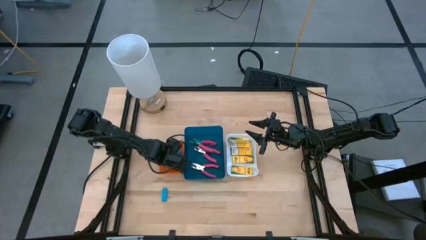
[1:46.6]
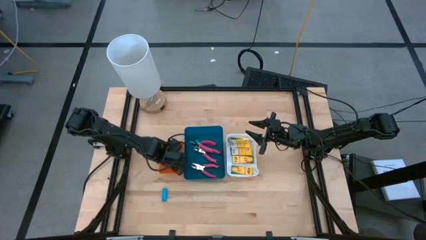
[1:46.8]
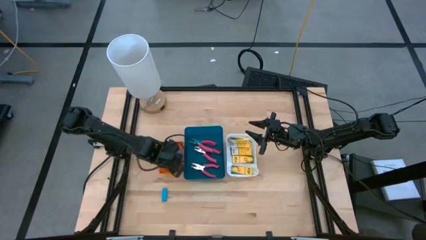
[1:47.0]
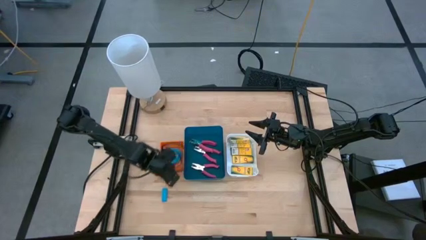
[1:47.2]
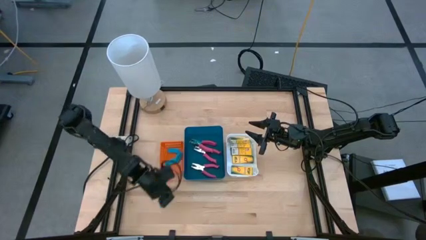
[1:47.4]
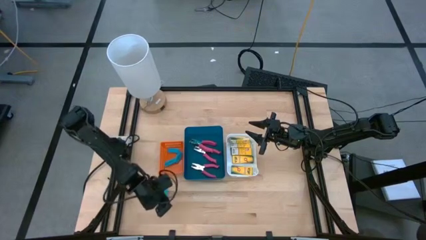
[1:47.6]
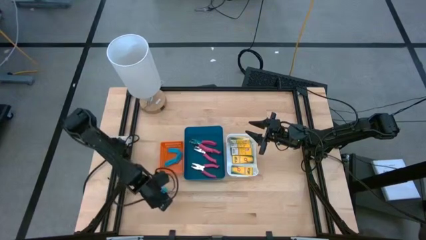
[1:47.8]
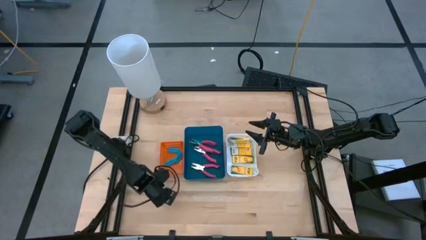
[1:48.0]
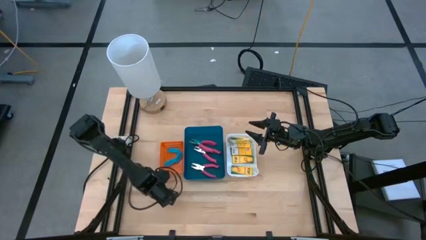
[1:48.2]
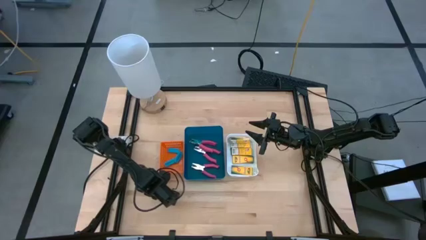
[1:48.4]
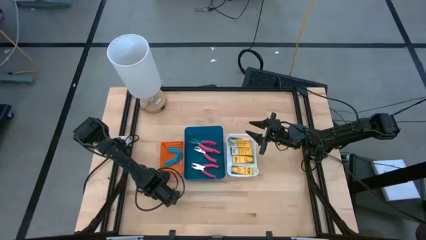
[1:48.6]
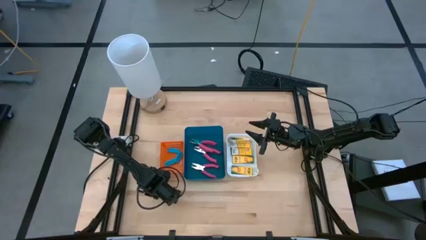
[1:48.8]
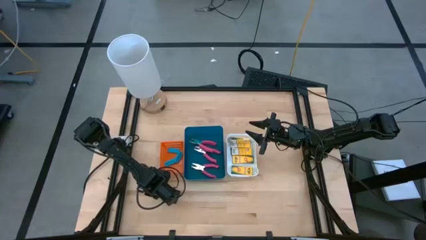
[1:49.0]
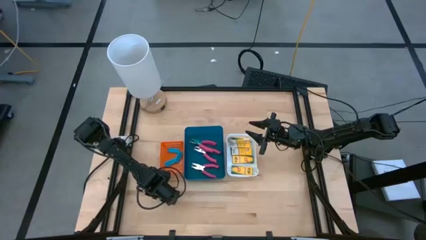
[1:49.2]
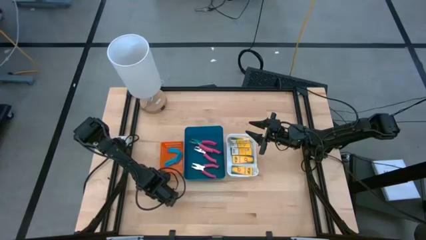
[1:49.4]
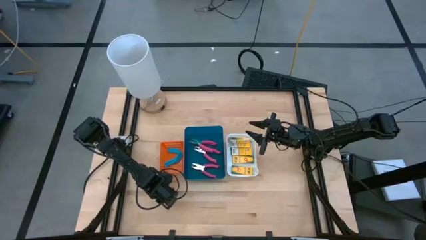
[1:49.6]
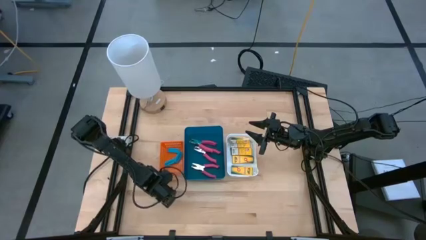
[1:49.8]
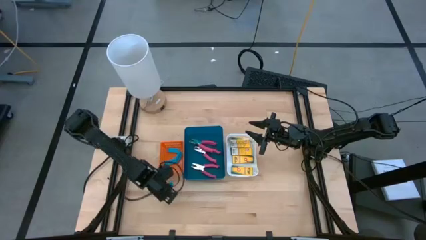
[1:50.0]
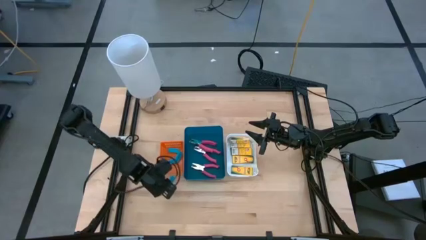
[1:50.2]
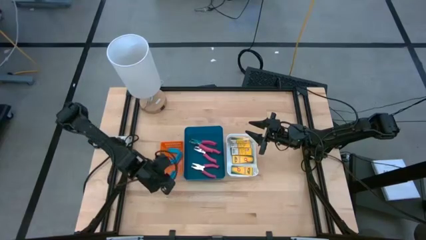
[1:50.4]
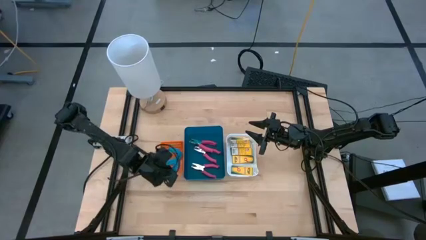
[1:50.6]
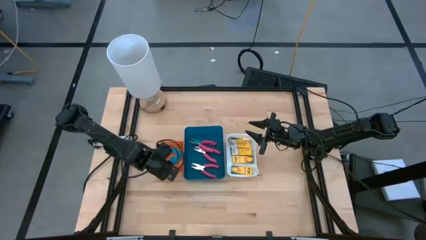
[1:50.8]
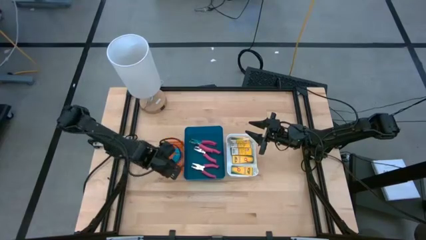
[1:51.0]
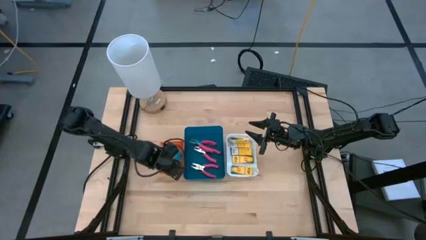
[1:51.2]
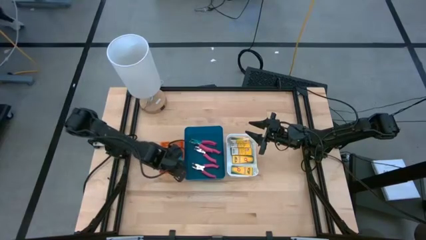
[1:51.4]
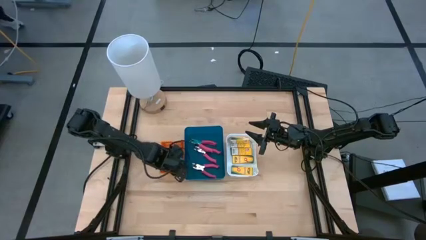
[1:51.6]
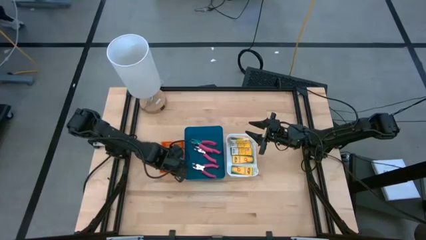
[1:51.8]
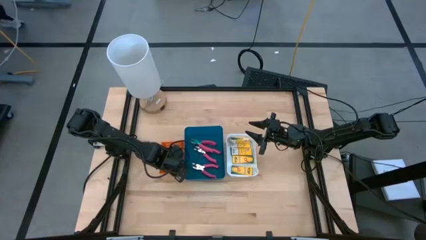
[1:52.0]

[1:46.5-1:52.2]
Task: Pick & Place School Supplies
Put the blue eraser into the orange bin

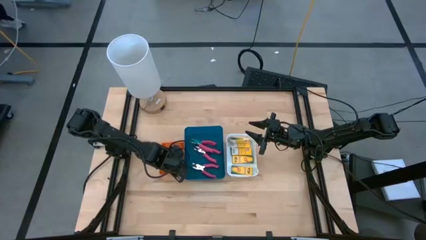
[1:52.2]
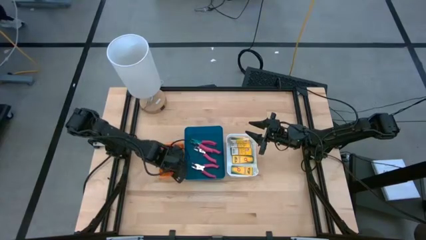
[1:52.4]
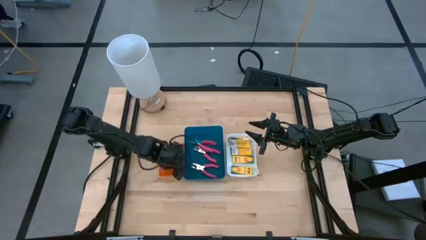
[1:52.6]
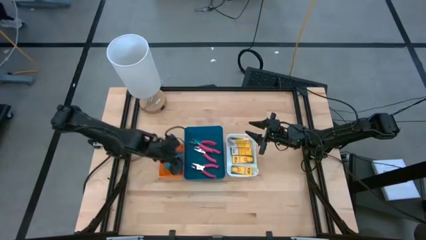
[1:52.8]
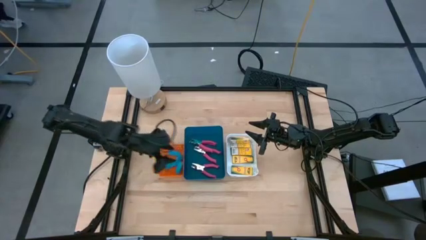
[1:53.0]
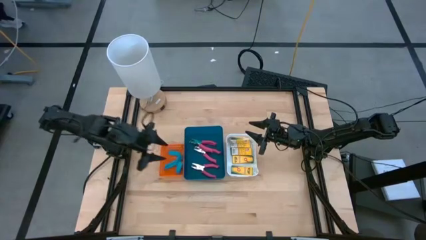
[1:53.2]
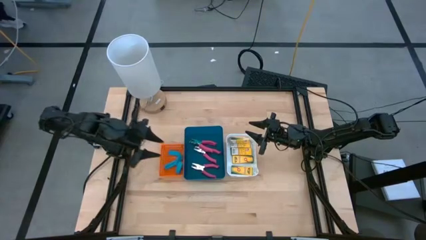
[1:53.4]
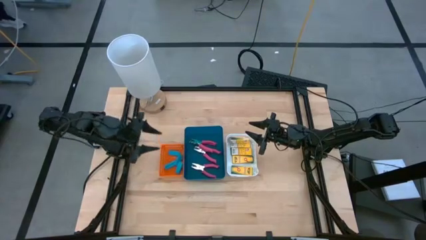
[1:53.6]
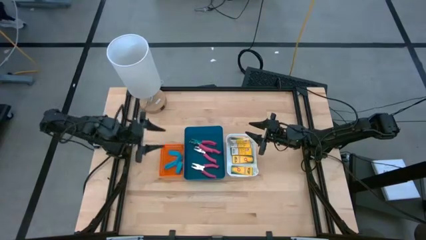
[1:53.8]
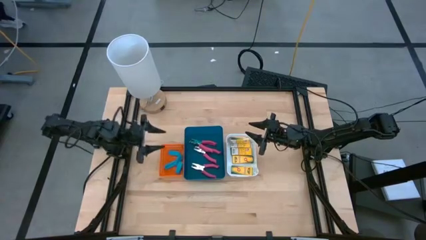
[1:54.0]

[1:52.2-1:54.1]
Return to Home Position

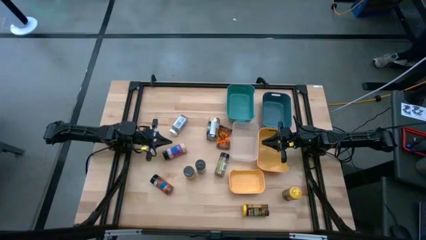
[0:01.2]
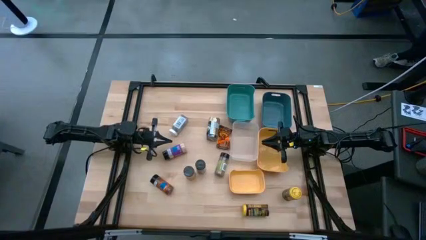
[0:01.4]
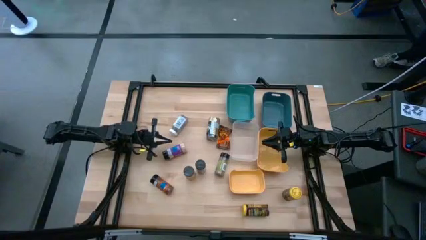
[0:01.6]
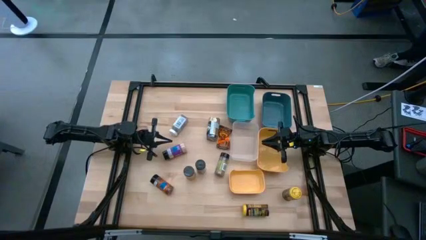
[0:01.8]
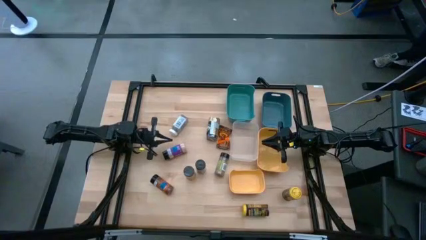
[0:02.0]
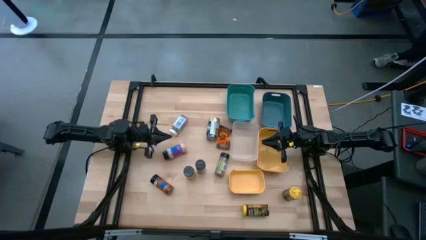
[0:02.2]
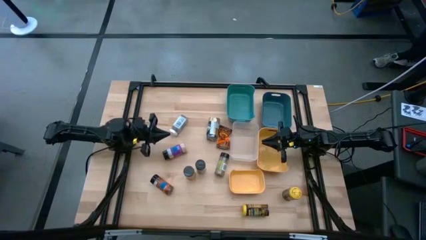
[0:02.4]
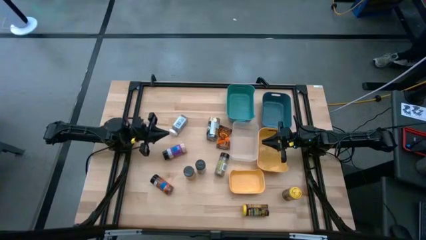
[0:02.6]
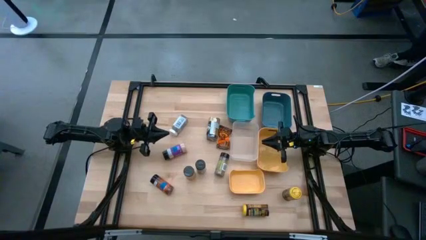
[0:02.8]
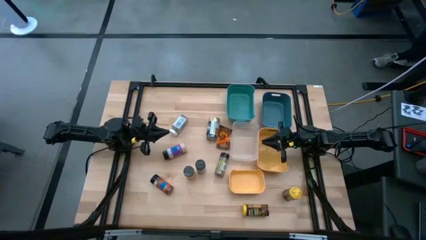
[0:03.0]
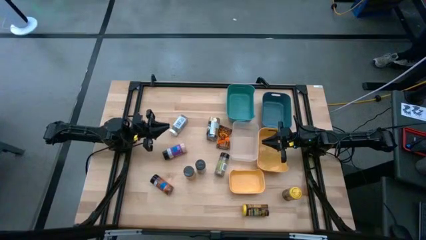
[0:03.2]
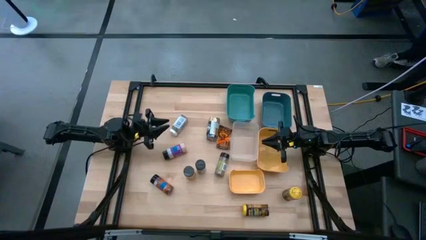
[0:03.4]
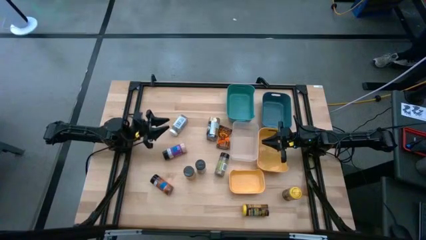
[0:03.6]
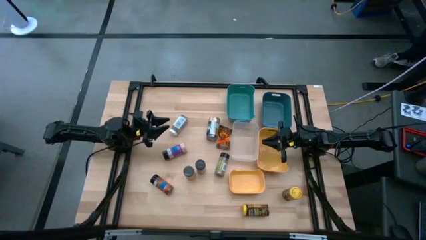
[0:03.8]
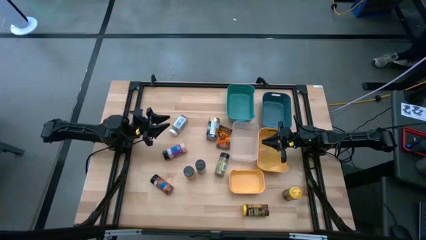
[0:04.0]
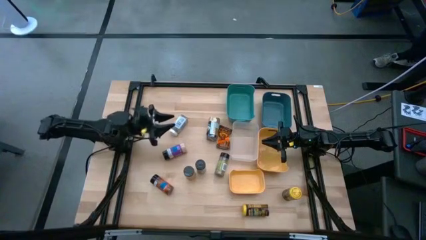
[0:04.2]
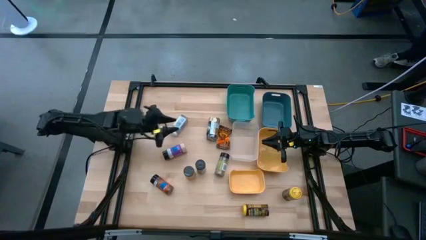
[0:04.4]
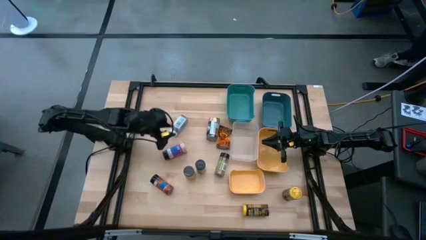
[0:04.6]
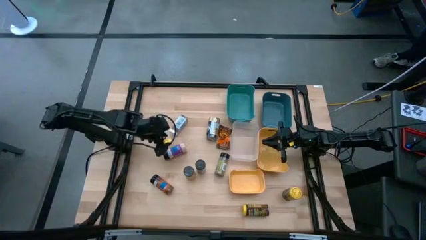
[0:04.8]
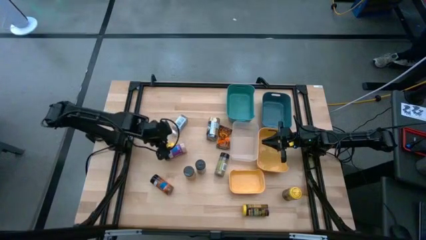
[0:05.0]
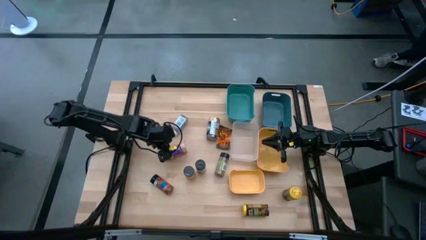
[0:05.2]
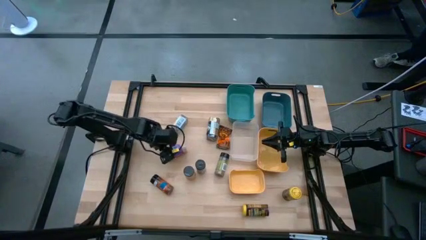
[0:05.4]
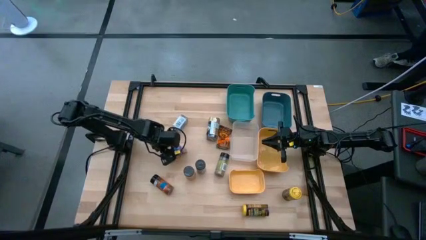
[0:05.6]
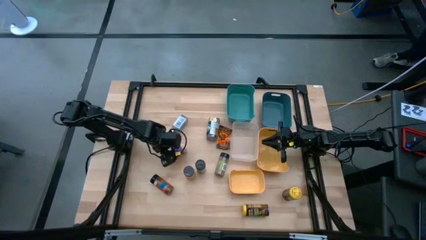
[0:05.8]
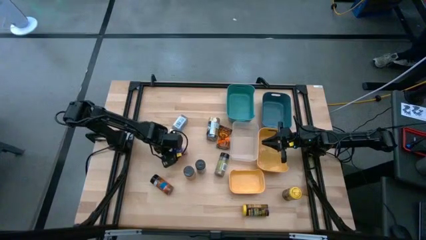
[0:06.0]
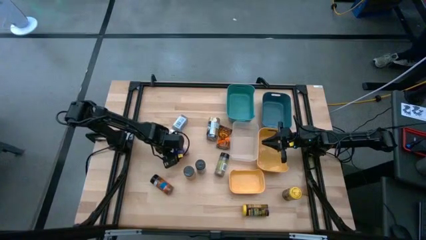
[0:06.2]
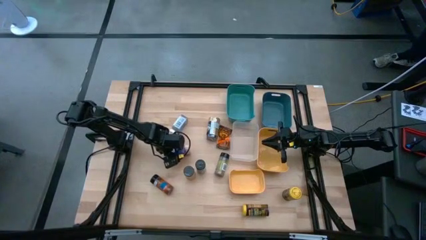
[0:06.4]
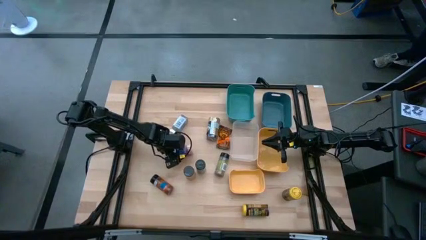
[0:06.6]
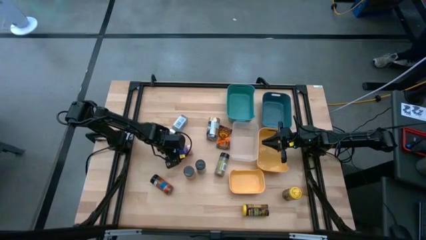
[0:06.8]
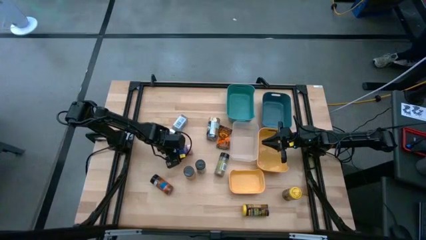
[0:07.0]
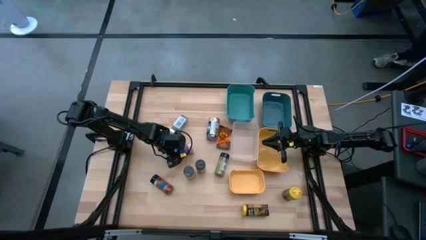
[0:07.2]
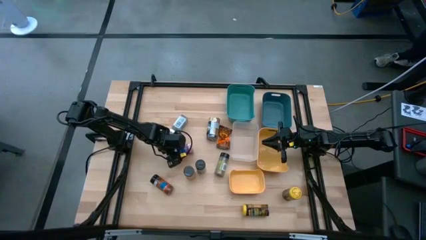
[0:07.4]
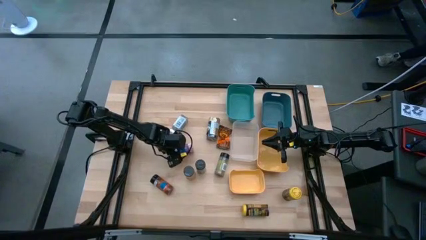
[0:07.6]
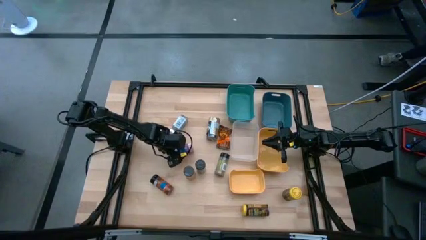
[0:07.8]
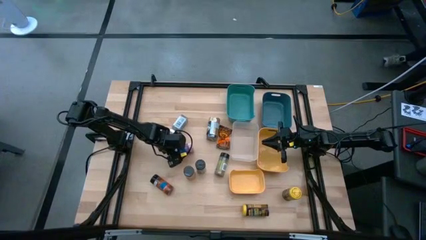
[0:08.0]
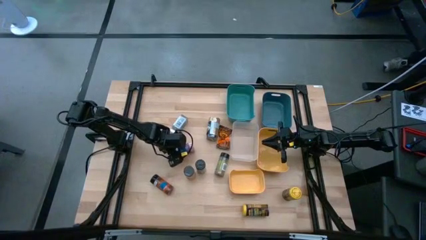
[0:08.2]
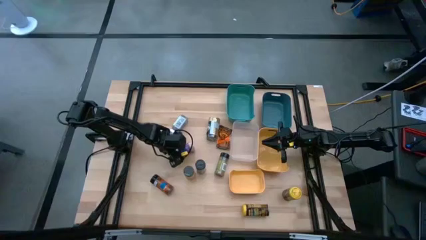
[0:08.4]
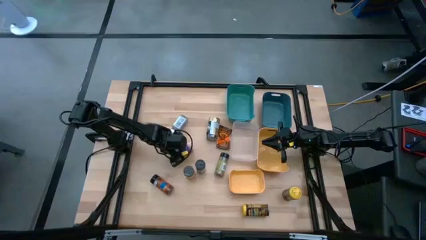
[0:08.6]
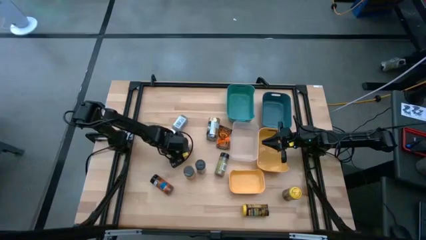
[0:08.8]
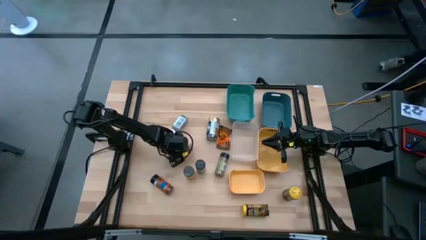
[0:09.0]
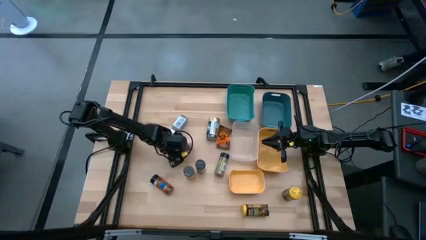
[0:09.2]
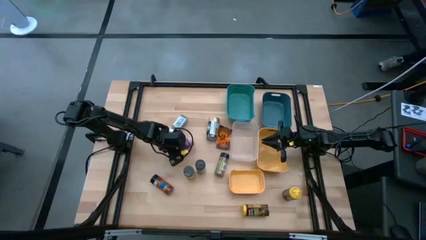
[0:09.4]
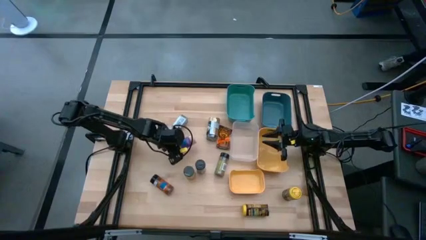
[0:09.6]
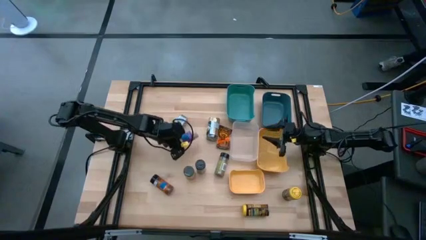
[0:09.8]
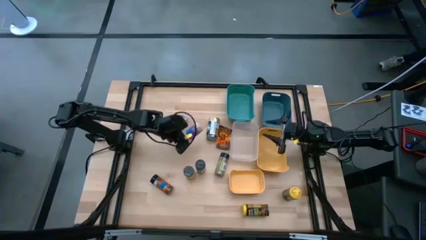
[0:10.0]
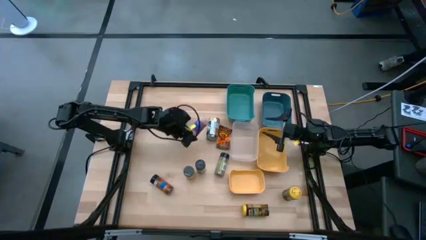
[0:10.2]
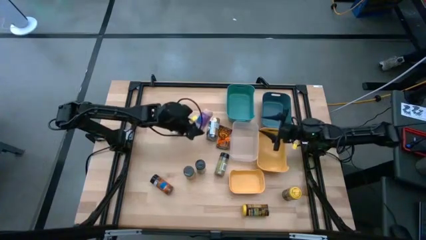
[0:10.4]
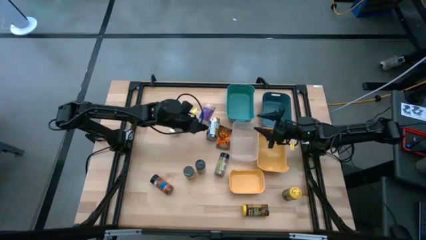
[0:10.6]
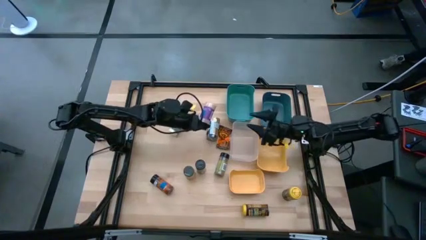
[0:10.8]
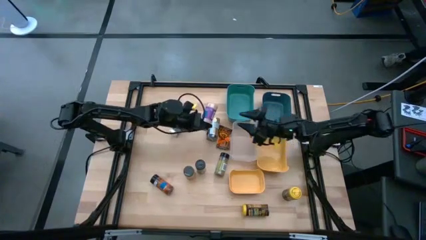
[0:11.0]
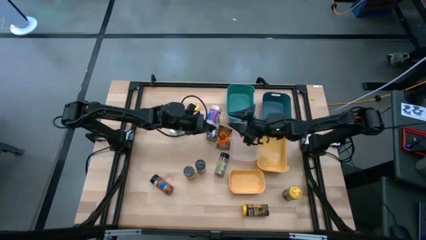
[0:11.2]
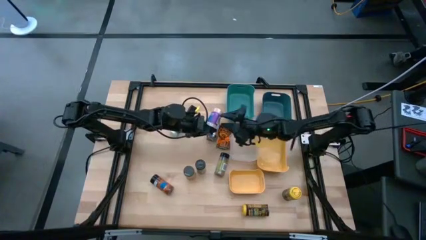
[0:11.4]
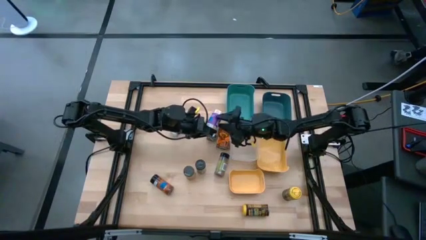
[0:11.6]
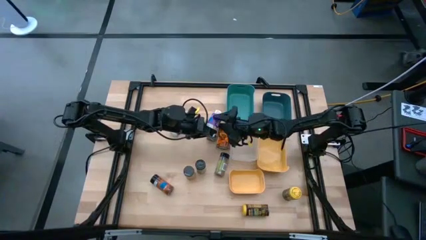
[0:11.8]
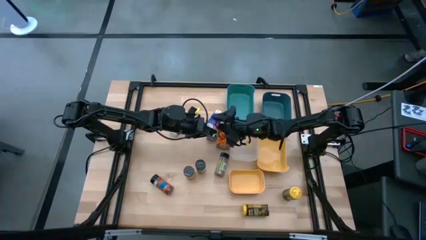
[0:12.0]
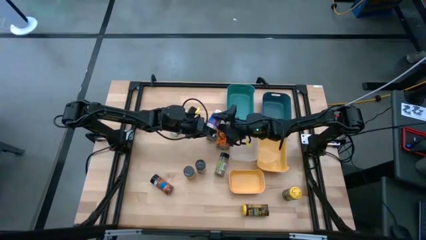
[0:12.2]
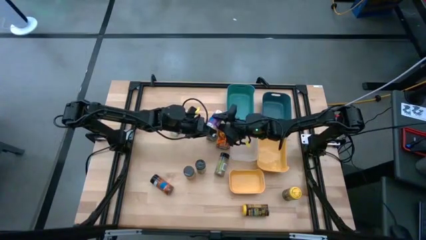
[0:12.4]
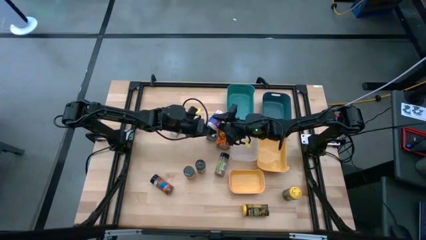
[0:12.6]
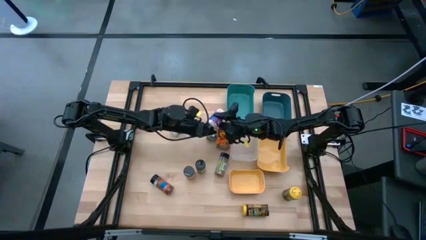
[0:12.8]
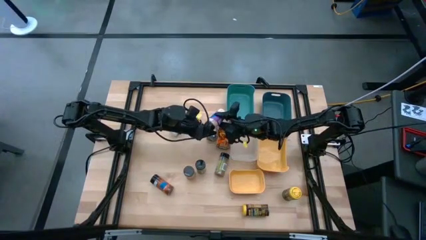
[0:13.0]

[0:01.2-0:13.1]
Task: Sort spices by type
Put the purple seasoning into the green bin
